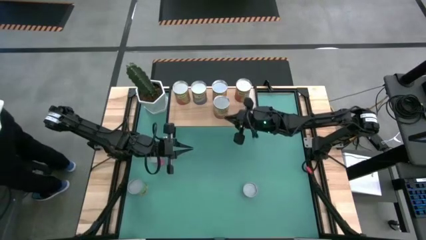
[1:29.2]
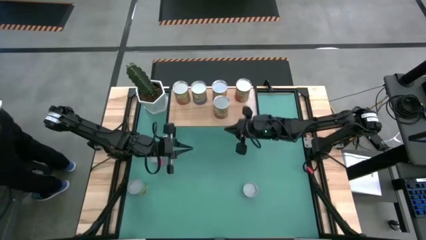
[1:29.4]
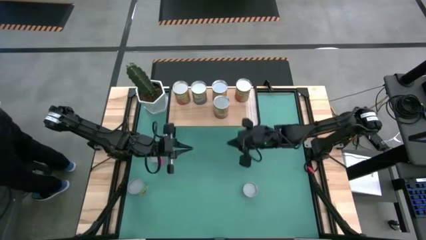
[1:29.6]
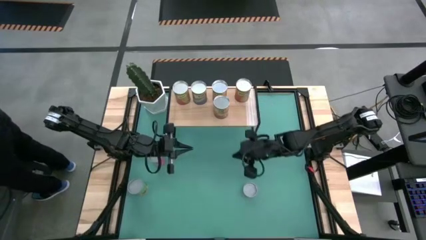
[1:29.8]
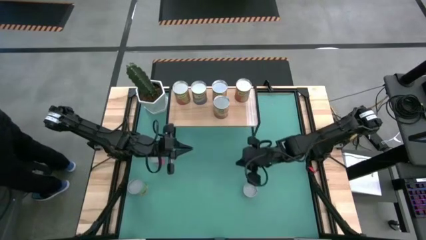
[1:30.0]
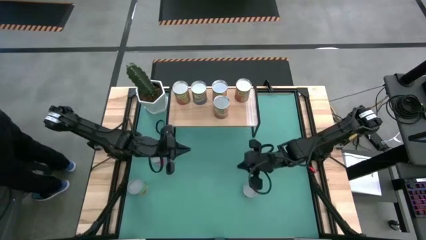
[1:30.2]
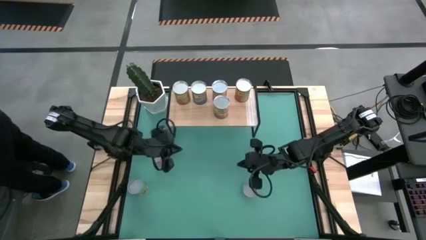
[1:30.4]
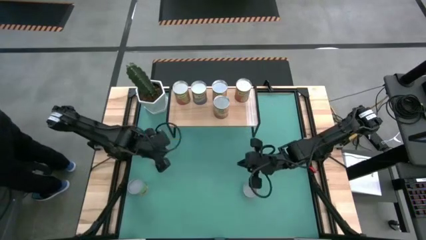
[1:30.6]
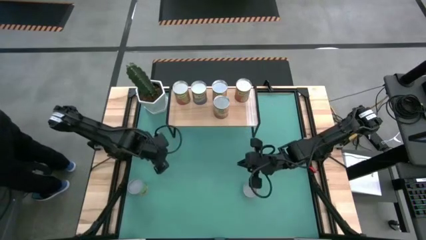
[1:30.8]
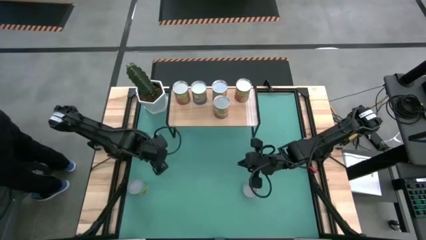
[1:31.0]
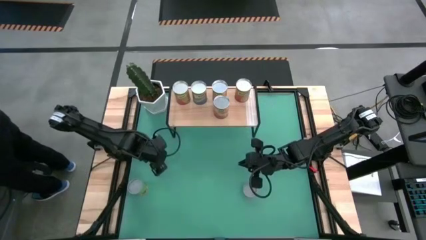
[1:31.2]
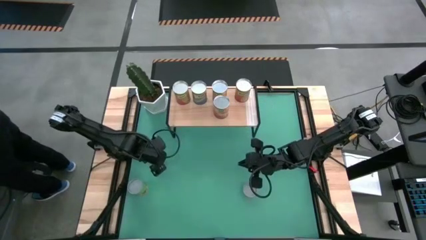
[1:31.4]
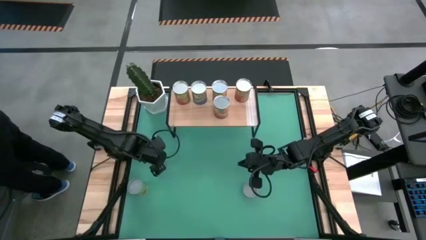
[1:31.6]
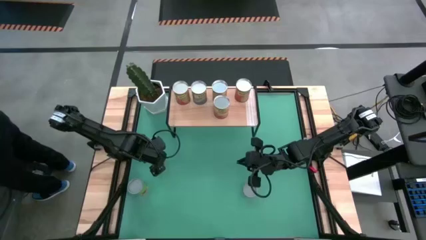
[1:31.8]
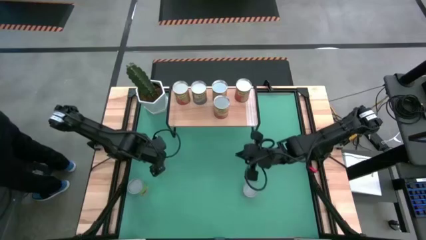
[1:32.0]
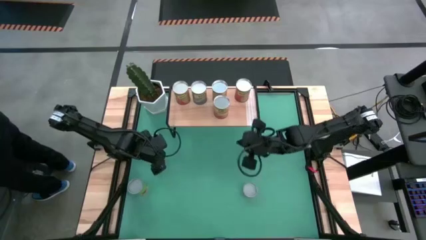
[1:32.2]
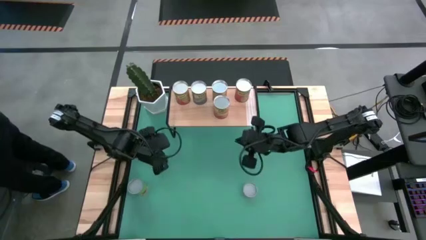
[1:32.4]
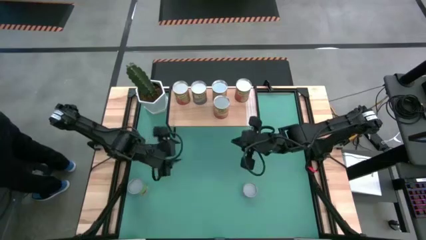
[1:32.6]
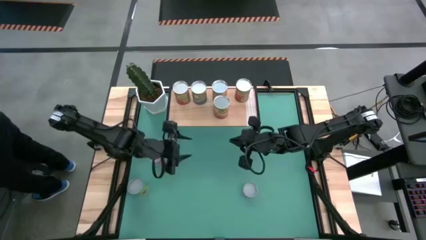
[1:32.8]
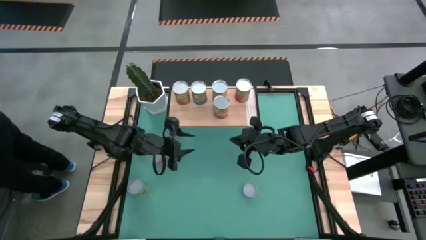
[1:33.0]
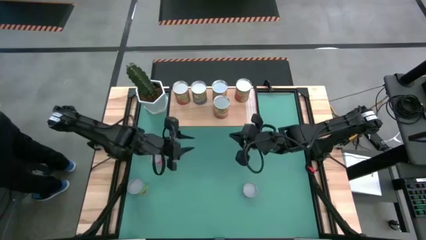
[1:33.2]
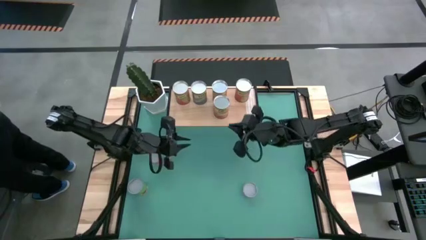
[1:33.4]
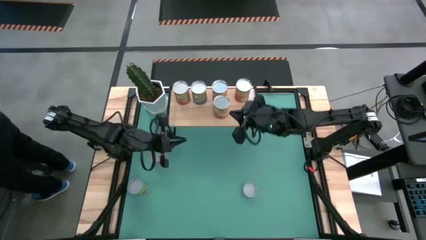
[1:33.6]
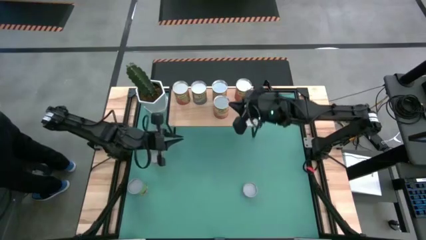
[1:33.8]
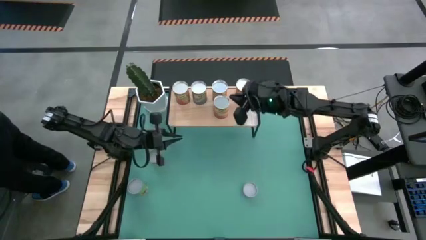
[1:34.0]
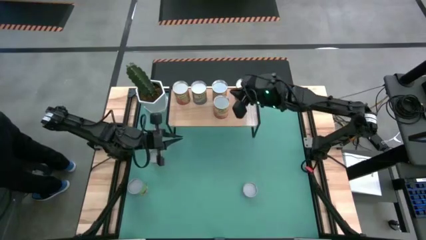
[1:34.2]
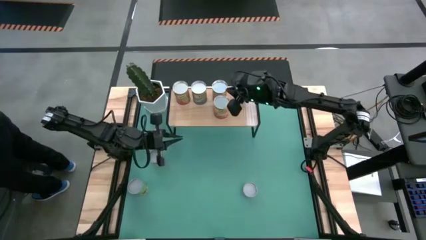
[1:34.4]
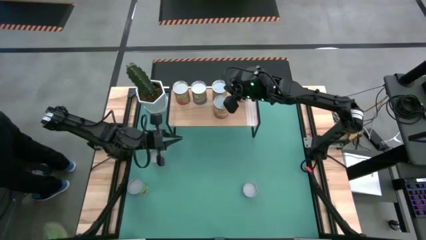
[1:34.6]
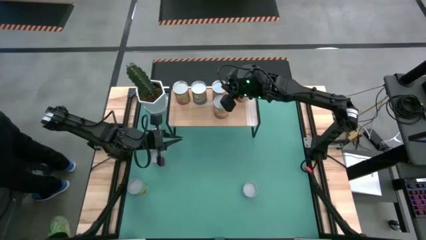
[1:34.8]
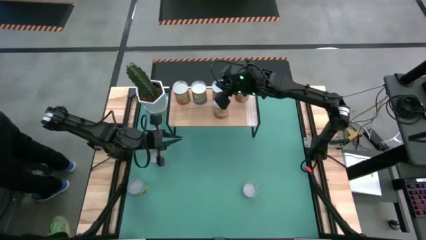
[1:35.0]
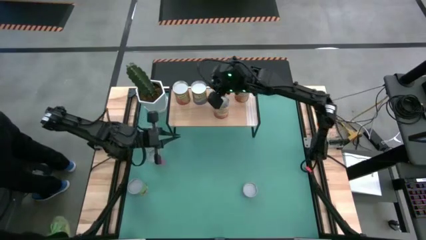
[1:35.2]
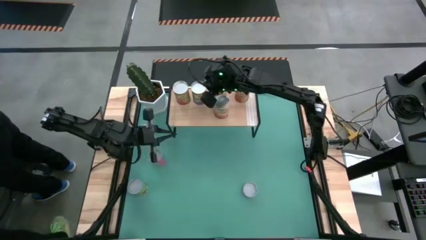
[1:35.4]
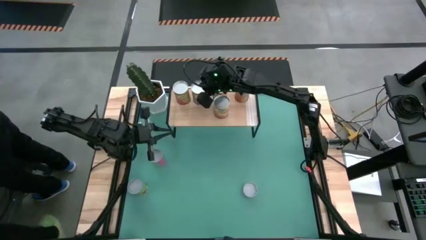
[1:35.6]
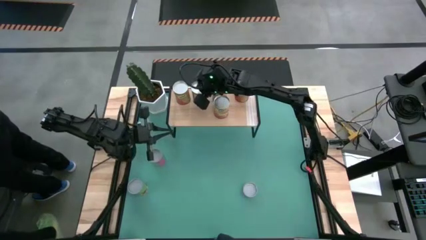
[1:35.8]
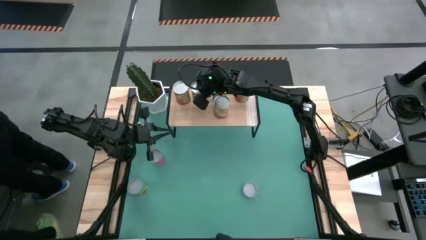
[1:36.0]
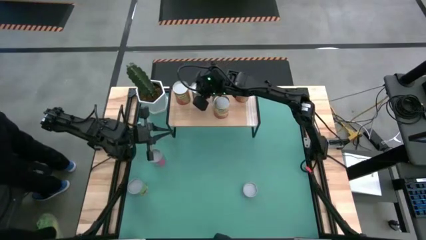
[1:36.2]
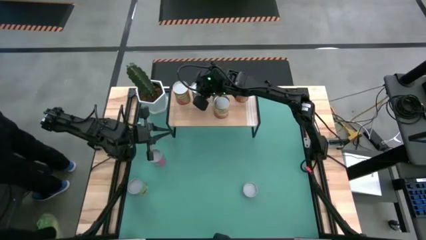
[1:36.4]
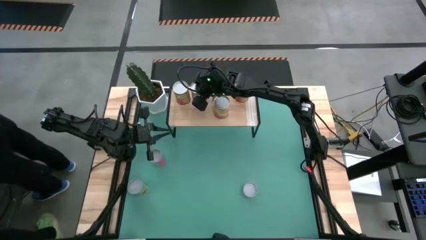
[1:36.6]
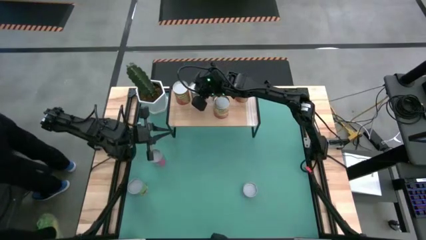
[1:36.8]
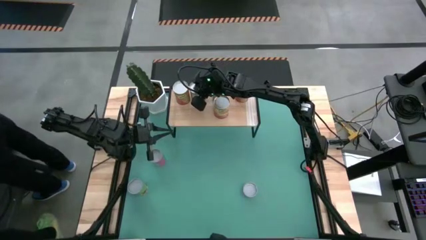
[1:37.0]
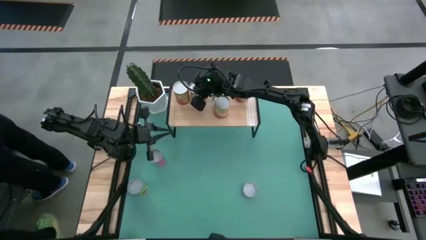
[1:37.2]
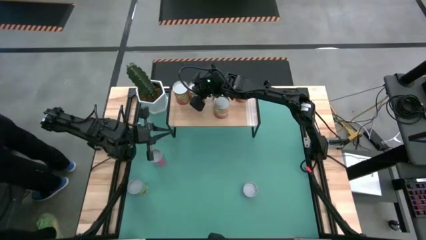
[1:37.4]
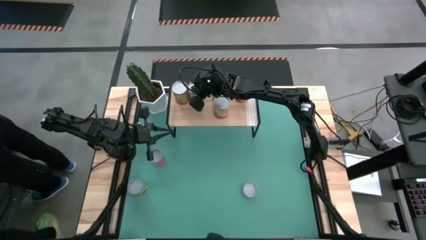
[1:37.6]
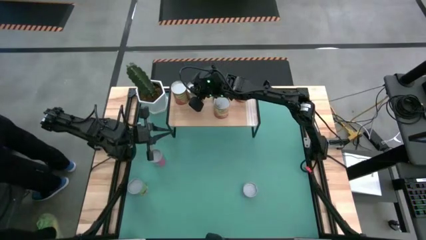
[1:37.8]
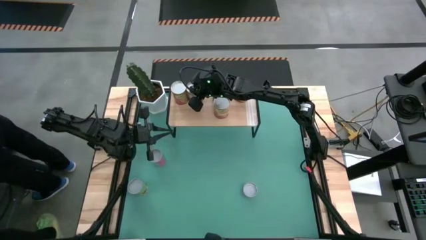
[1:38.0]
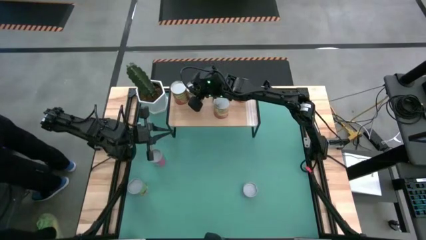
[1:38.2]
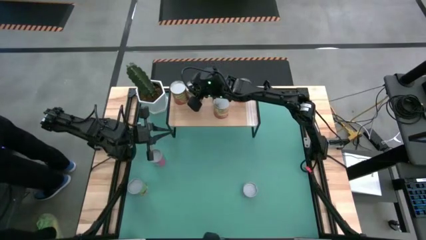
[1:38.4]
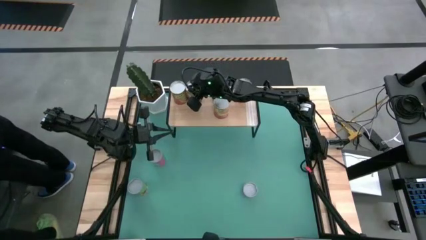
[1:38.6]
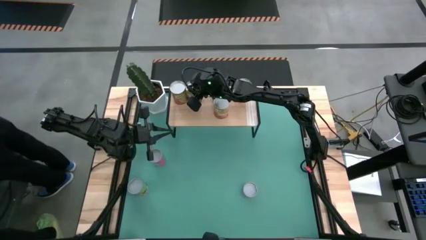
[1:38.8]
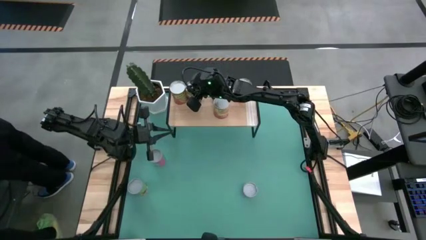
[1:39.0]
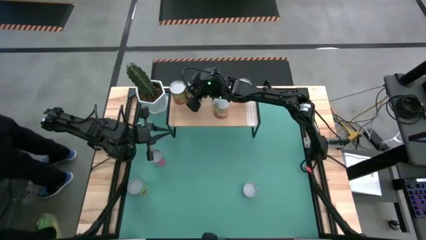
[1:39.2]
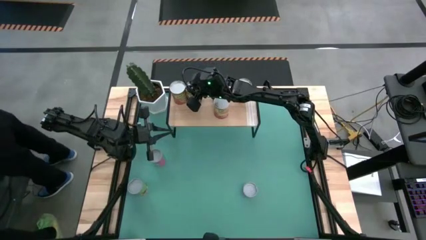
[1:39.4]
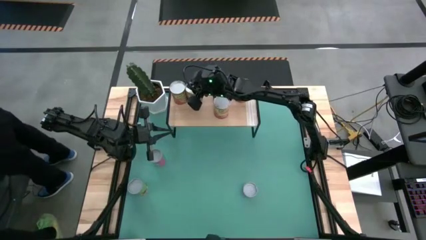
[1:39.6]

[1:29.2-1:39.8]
Task: Pick and place cans onto a shelf
Adjust the canned peas on the shelf

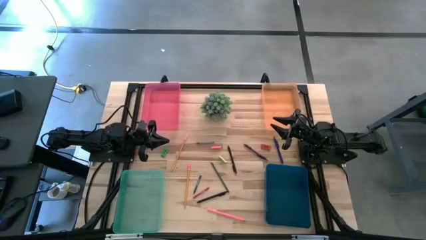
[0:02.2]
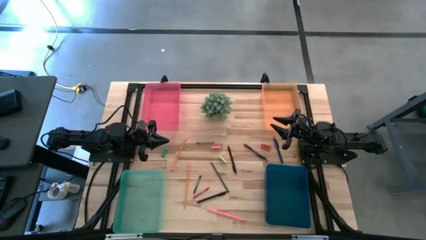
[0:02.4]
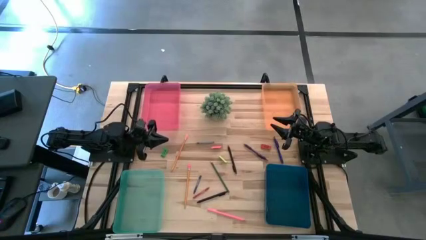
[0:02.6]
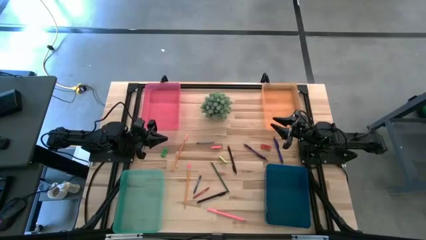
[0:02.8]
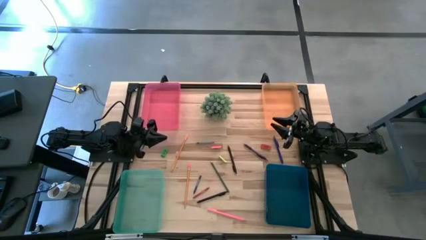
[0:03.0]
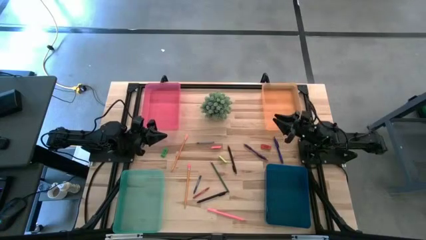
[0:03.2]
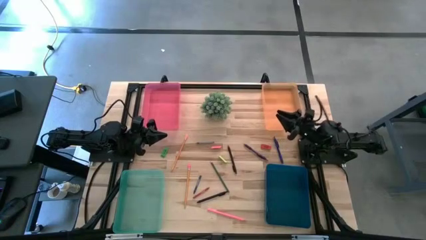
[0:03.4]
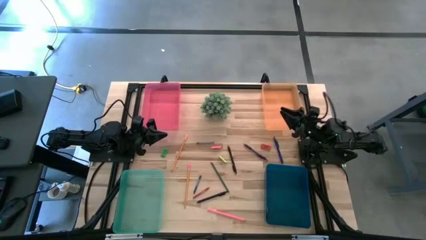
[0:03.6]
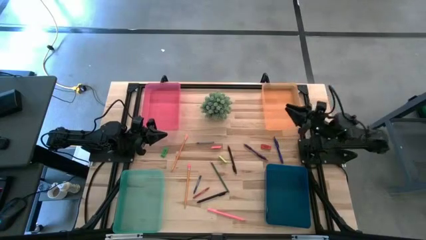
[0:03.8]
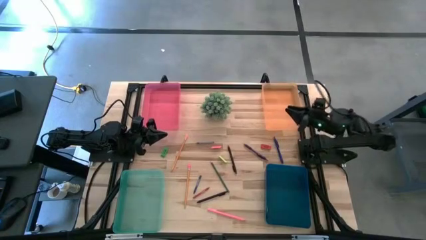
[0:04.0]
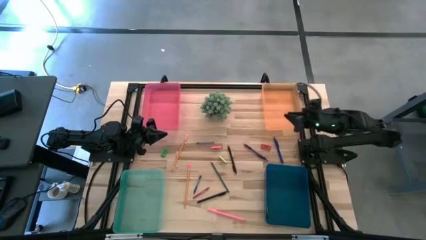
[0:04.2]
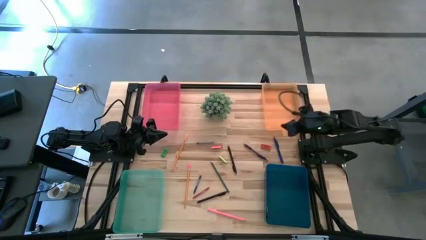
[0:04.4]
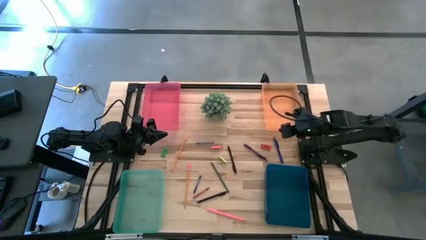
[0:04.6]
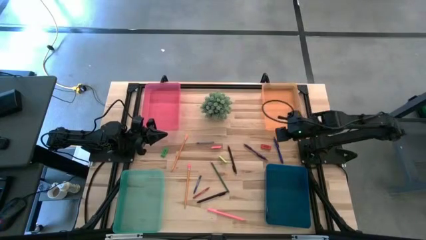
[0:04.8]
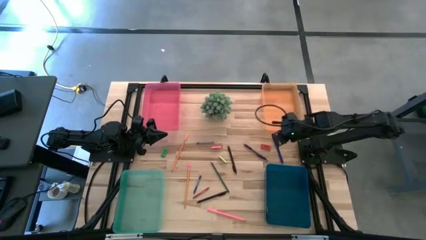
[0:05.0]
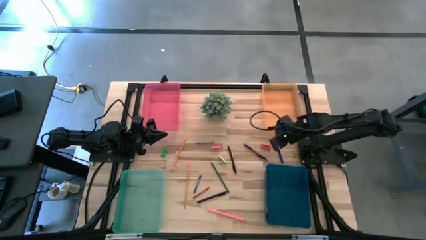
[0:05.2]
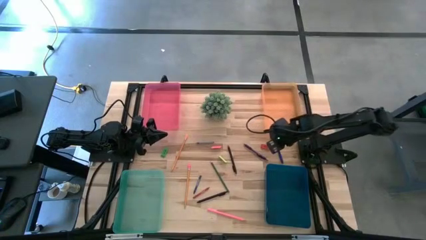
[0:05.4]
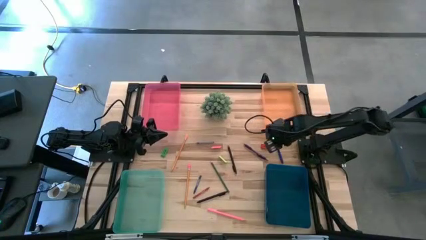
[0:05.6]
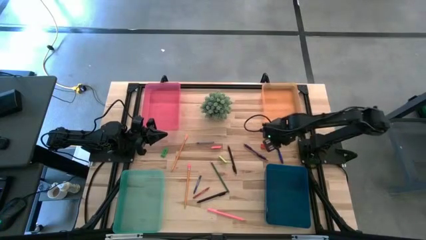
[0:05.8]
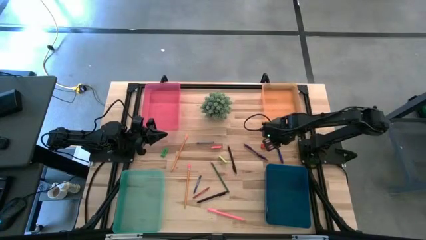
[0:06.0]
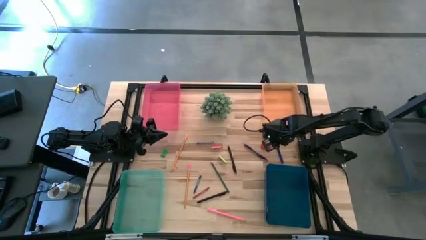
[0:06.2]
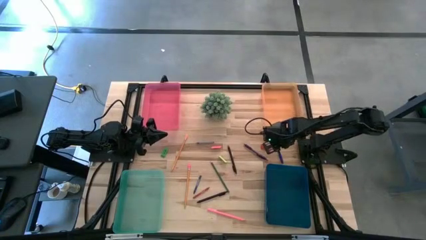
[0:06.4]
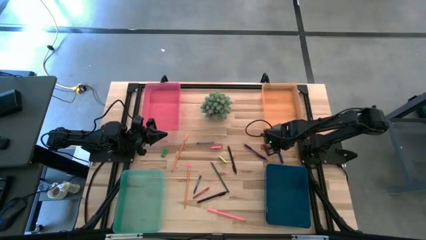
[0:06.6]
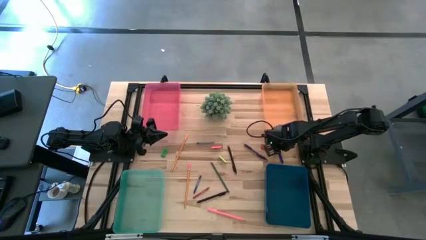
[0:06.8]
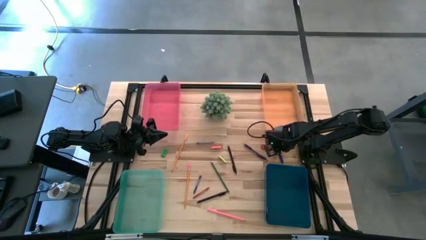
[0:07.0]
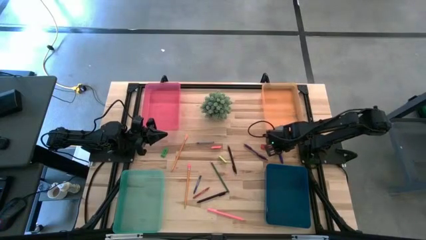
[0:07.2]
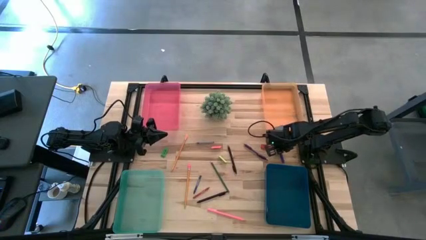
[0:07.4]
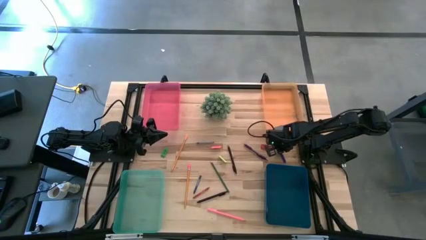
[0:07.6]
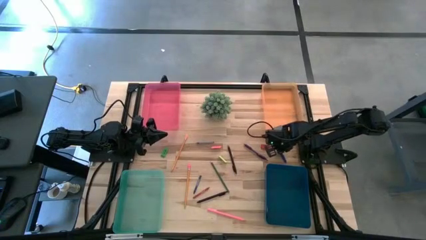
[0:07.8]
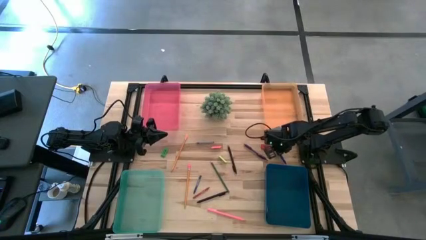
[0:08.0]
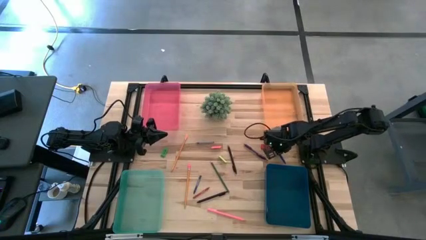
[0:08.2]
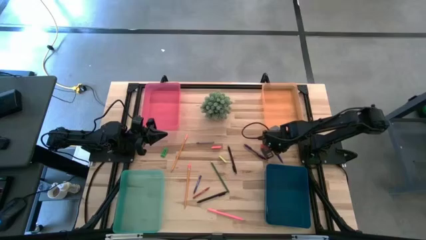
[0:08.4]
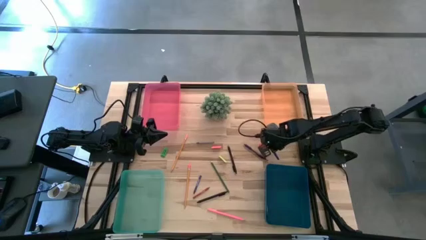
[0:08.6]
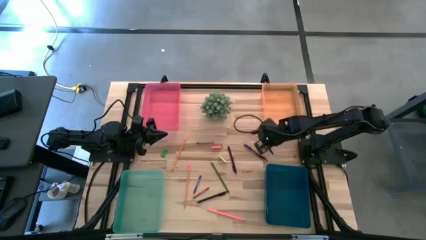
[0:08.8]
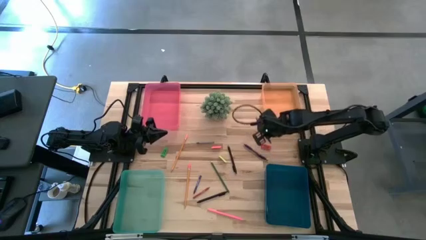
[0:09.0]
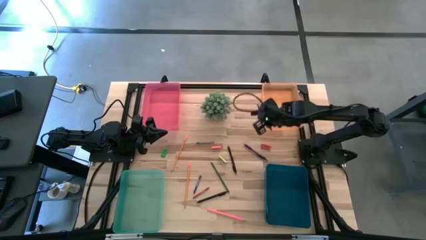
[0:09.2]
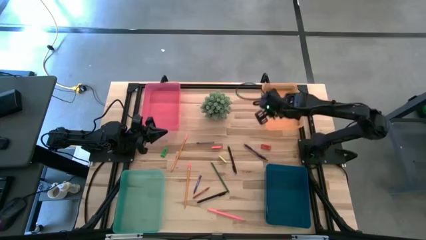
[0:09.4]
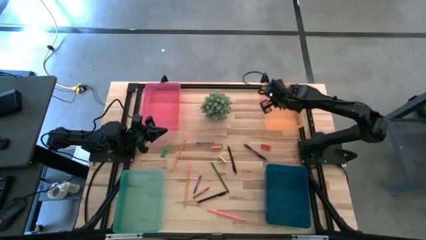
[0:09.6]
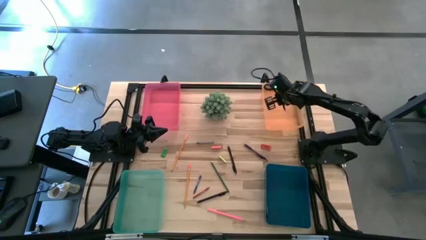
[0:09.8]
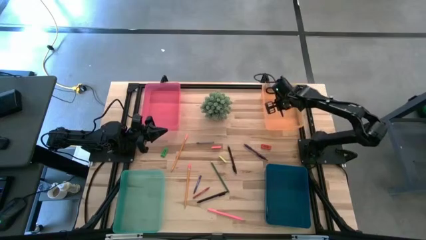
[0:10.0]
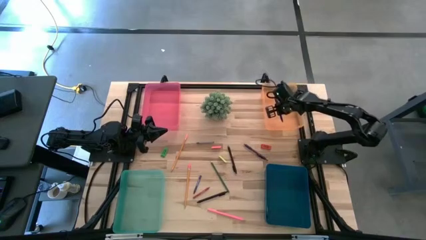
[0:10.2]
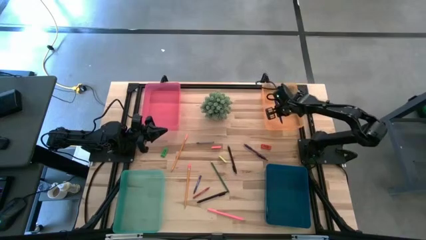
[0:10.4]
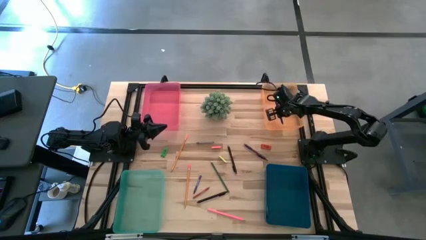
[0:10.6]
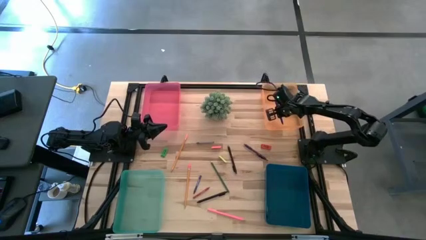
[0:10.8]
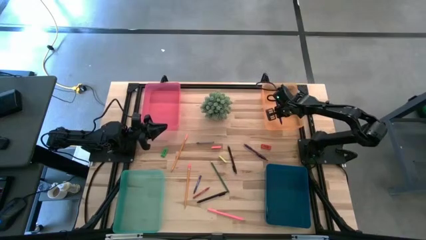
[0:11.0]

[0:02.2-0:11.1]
Task: Sort crayons/erasers/pens/pencils in bins
Put the blue pen into the orange bin
